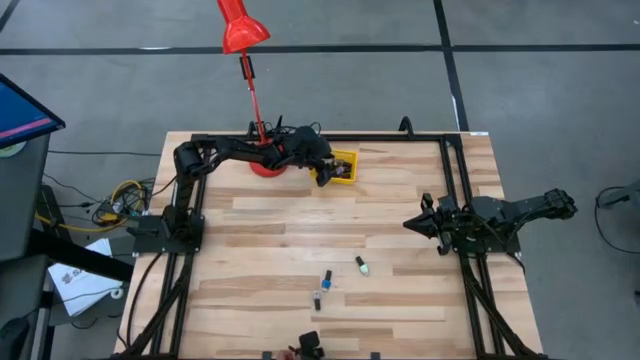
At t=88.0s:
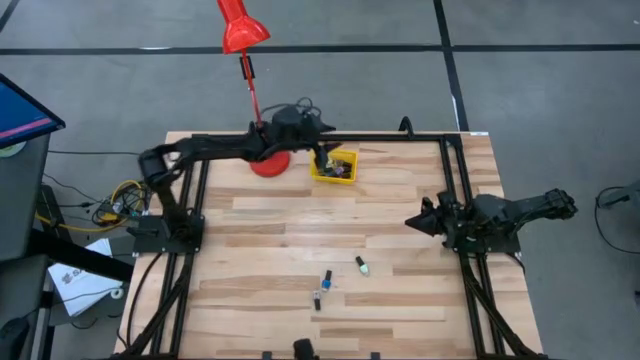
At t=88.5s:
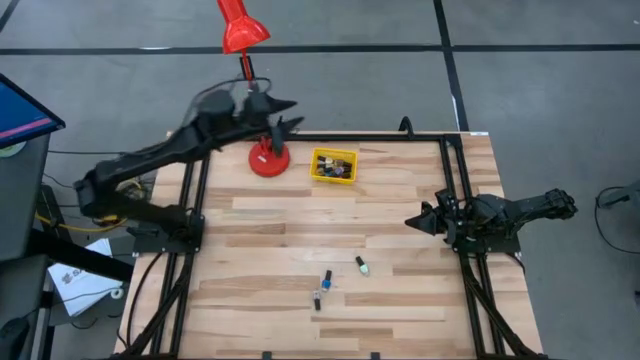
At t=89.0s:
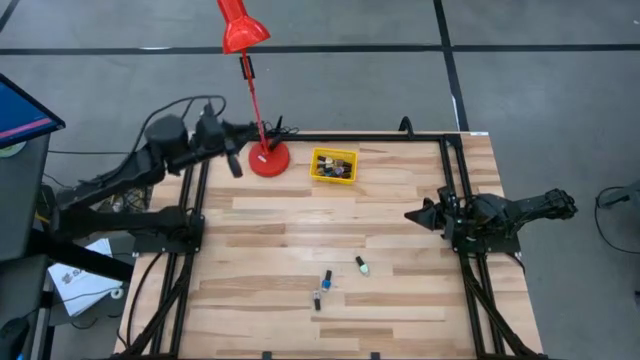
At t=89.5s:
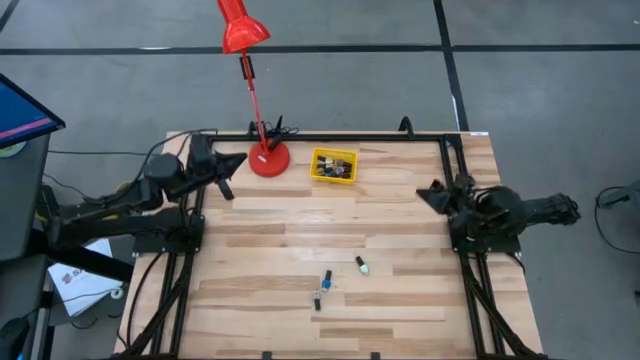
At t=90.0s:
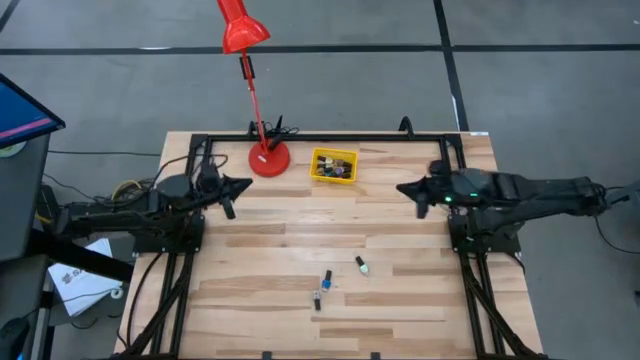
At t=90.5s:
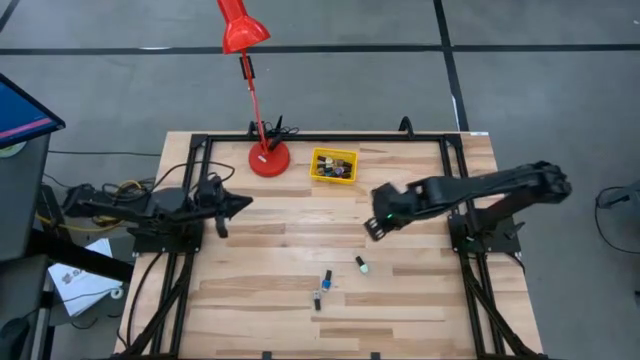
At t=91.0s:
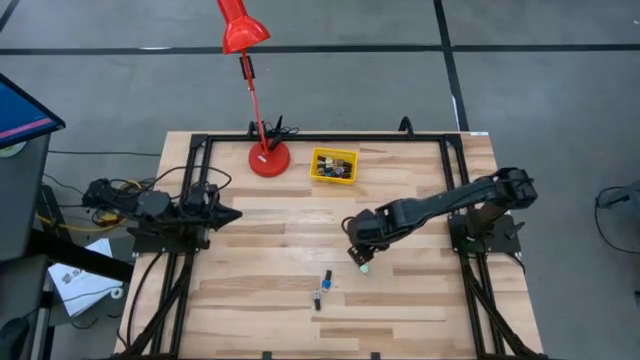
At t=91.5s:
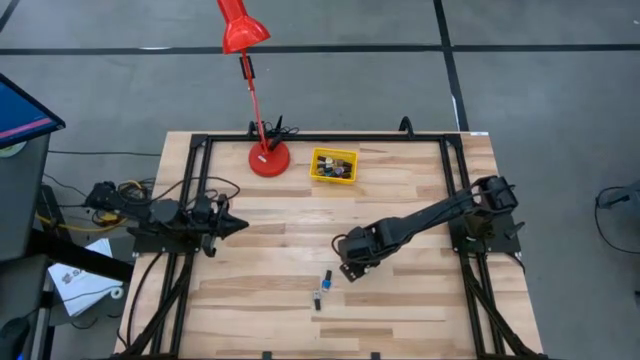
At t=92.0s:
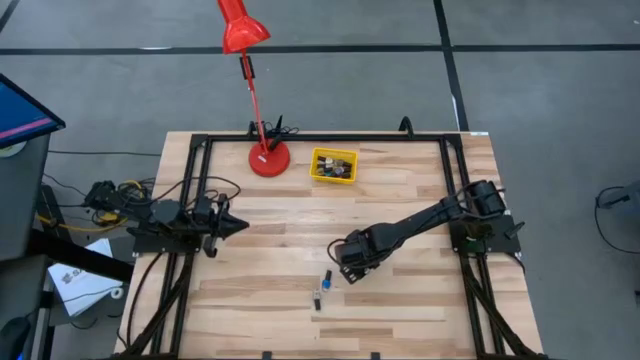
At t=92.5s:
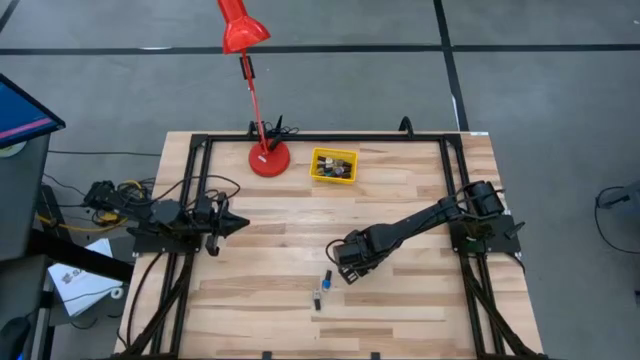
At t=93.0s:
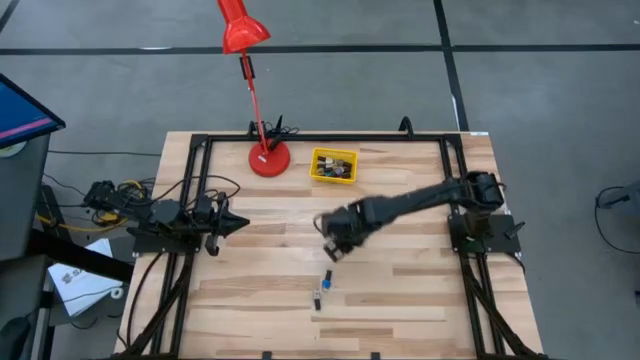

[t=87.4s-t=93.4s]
Task: Pick & Place Nail Polish
Put the light blue nail polish bottle into the yellow bin

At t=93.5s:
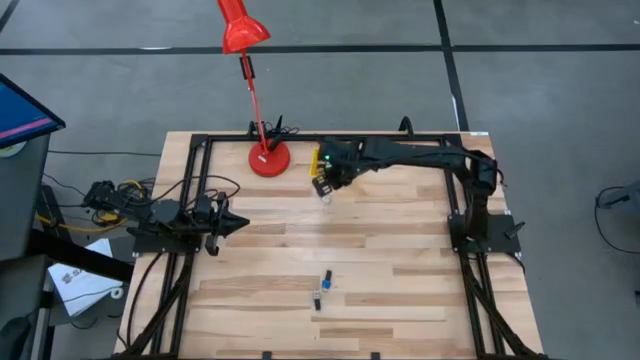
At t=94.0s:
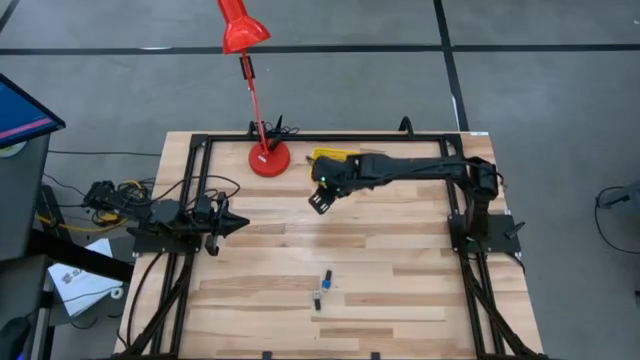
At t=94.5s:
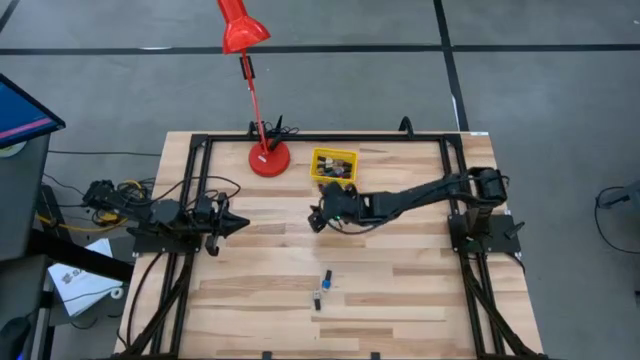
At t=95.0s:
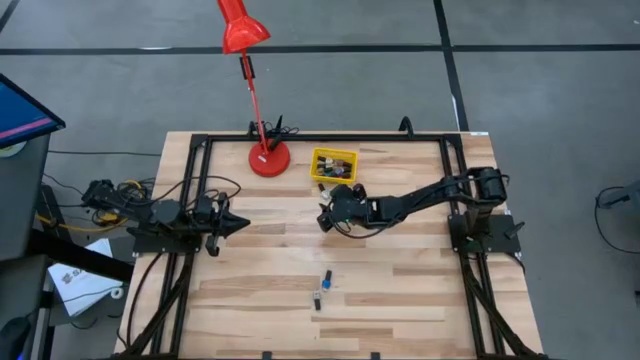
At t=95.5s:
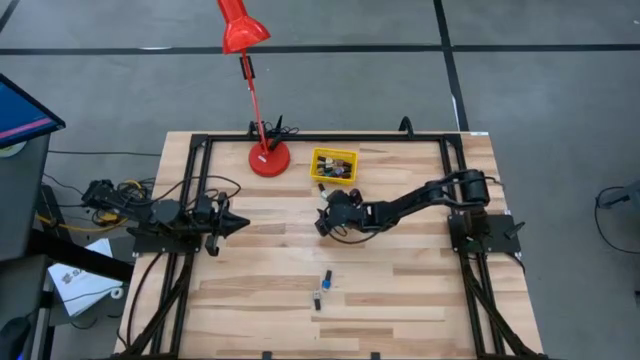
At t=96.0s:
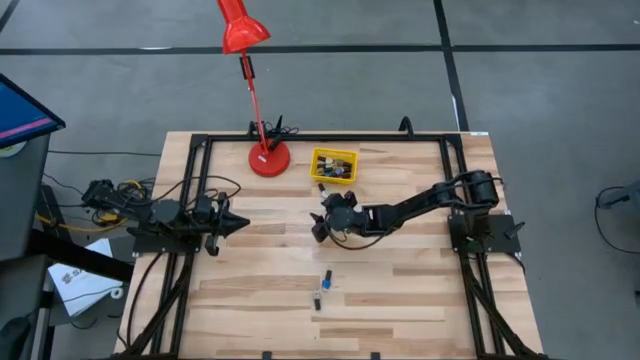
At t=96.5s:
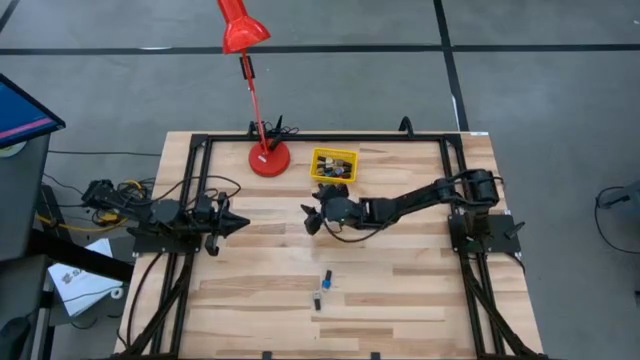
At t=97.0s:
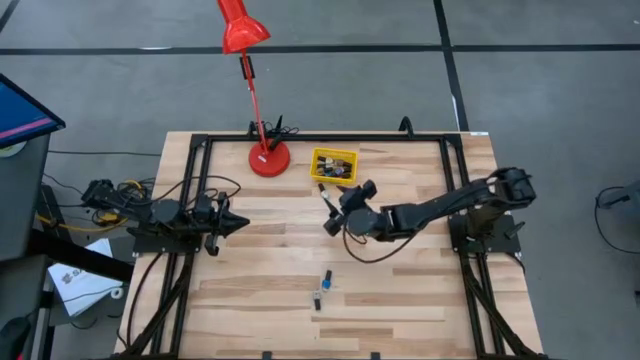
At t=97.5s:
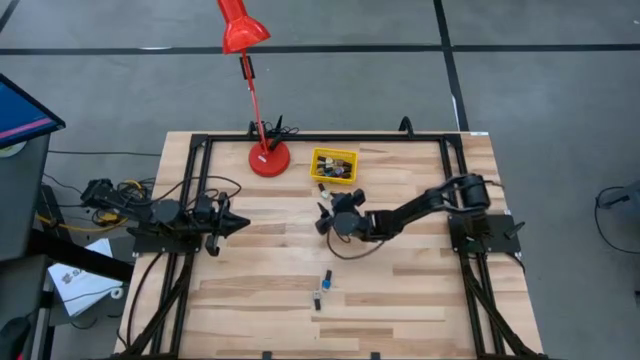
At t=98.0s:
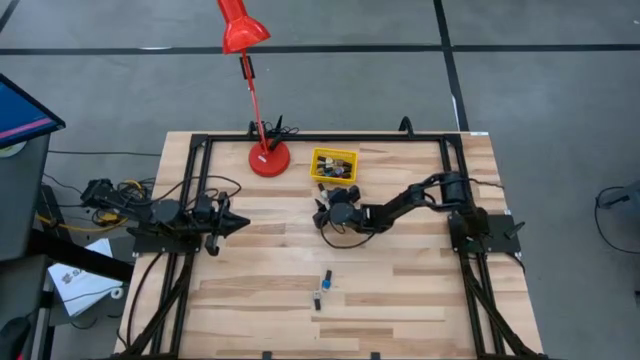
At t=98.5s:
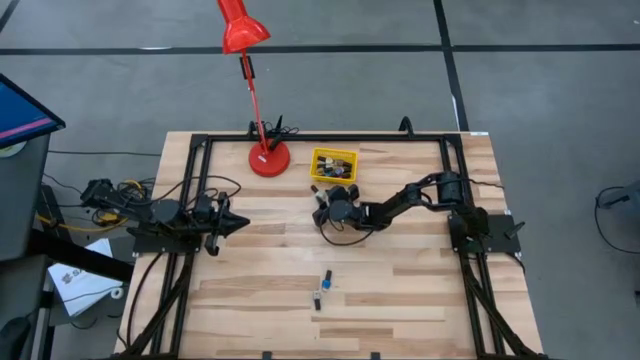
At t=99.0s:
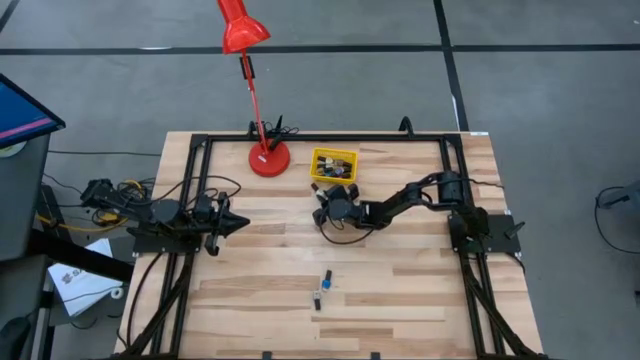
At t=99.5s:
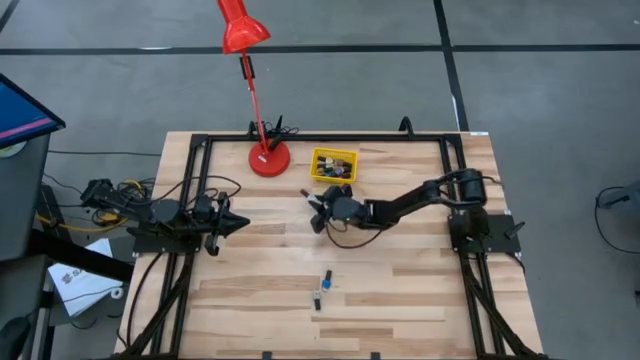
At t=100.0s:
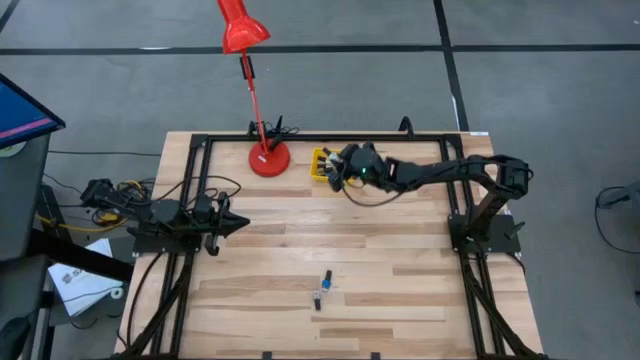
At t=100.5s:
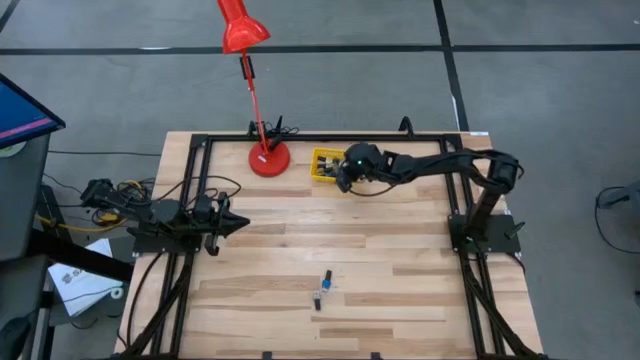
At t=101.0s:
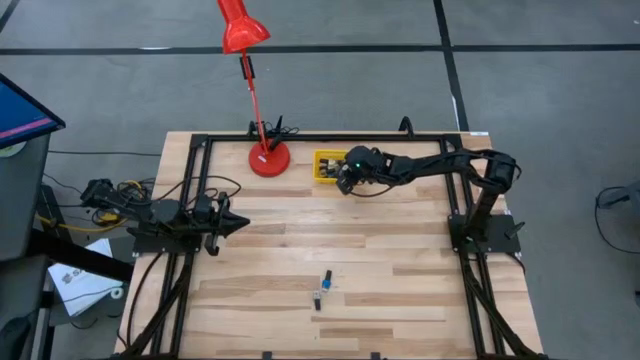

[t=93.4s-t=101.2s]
Put the light blue nail polish bottle into the yellow bin

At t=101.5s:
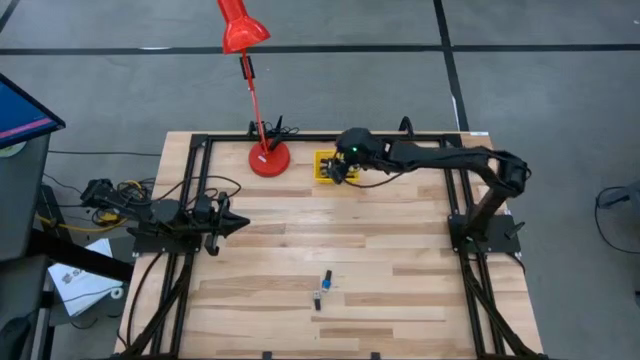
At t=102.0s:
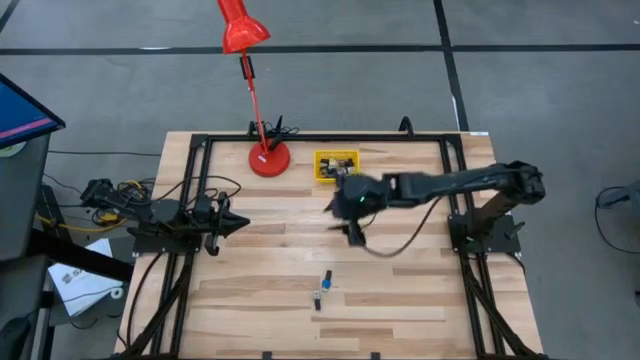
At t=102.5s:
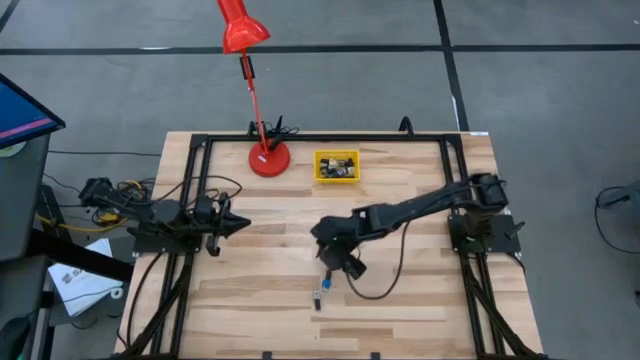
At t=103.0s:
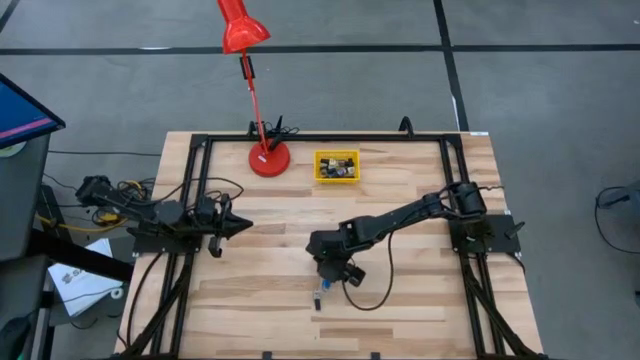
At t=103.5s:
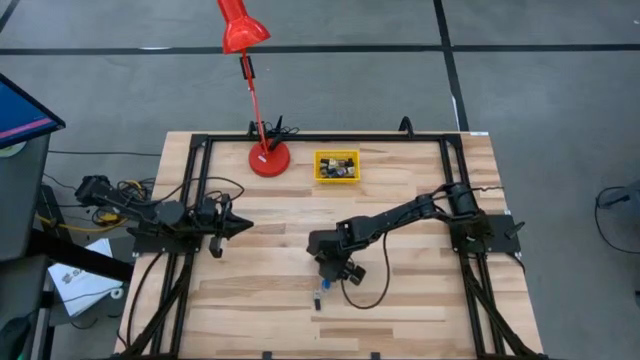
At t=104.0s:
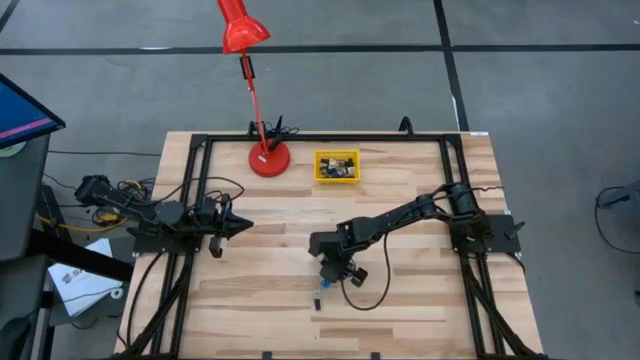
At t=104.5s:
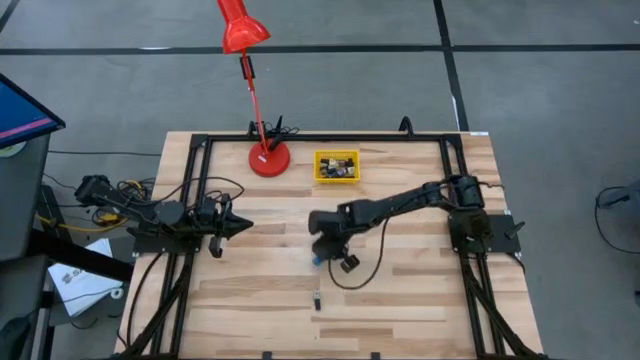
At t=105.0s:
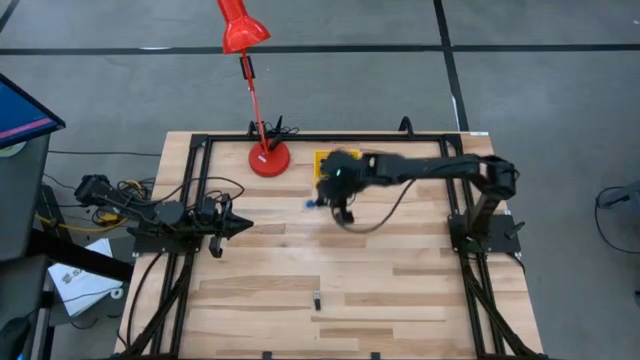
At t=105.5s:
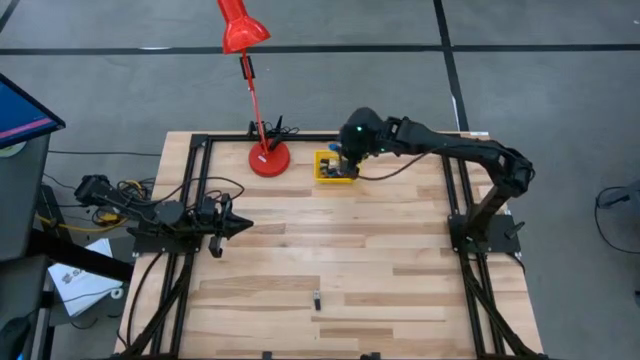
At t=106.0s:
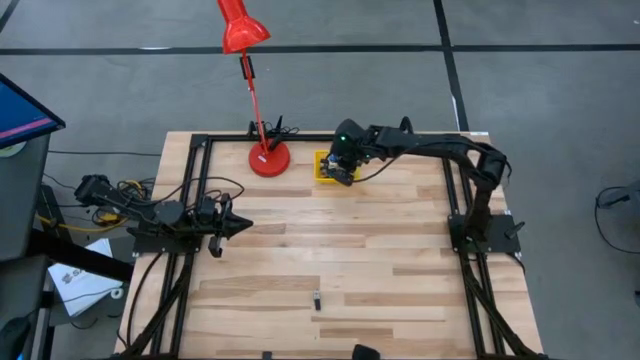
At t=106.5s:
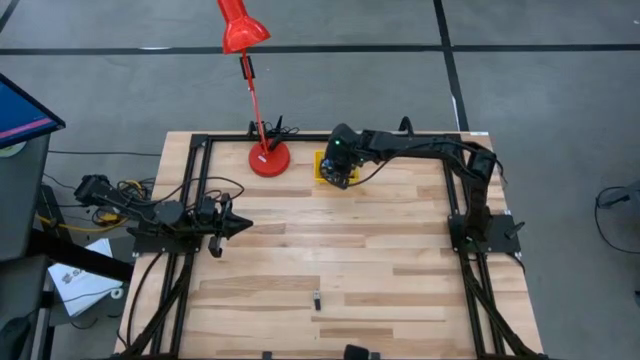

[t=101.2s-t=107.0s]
Put the dark blue nail polish bottle into the yellow bin

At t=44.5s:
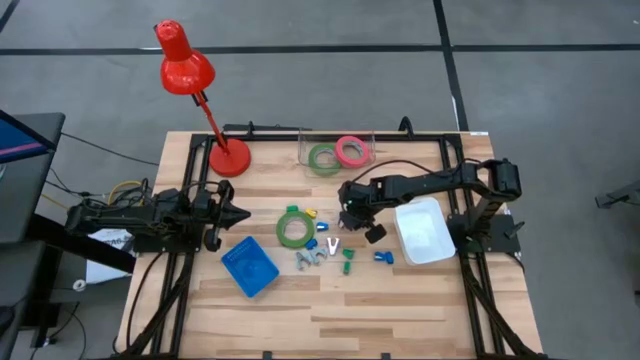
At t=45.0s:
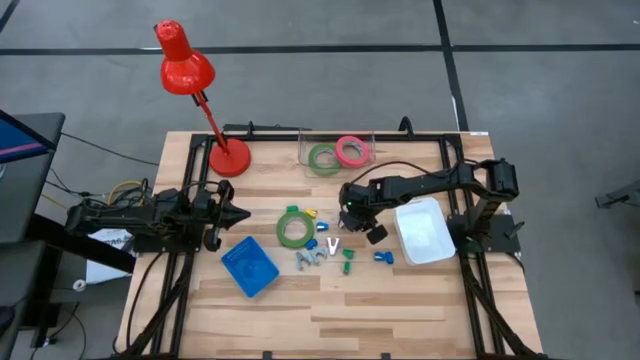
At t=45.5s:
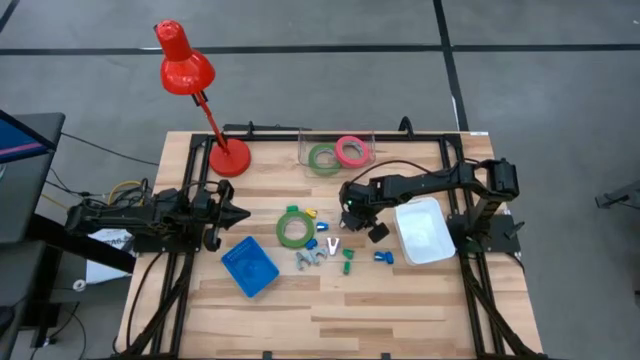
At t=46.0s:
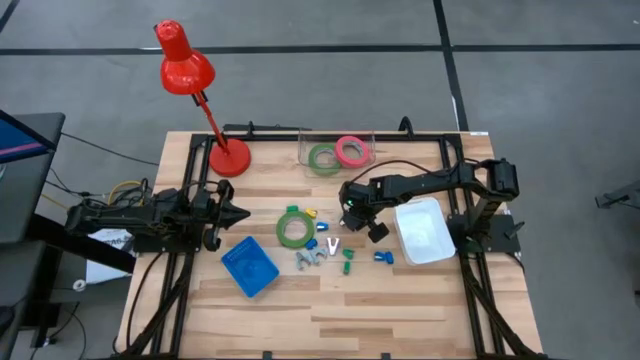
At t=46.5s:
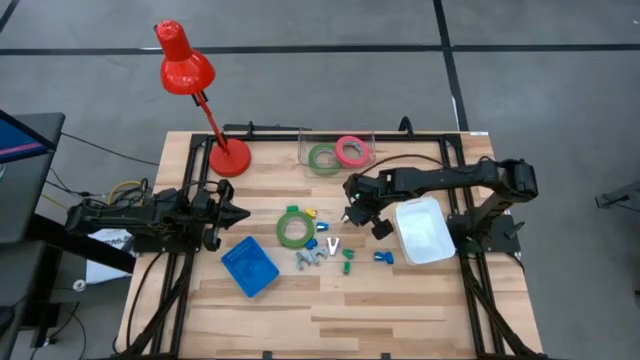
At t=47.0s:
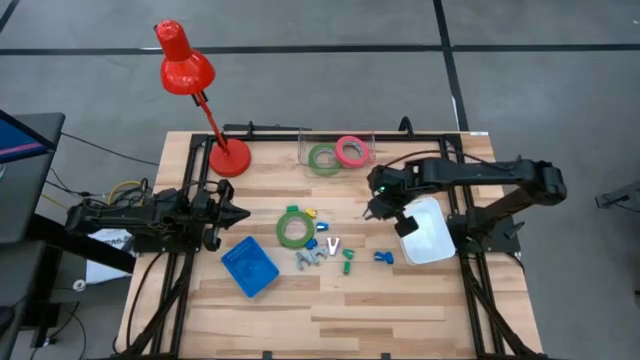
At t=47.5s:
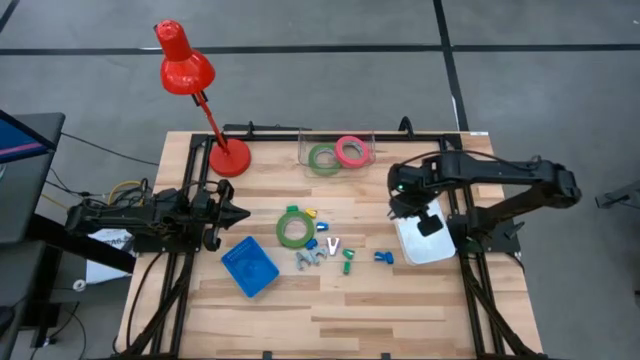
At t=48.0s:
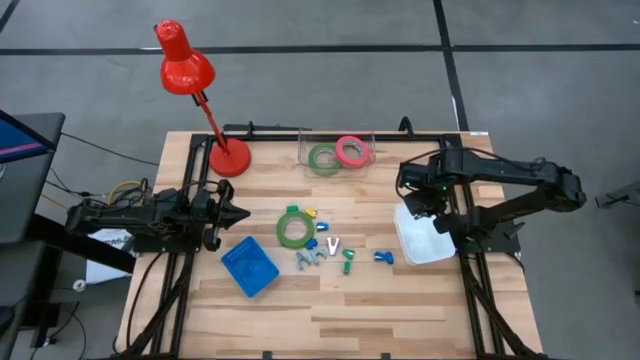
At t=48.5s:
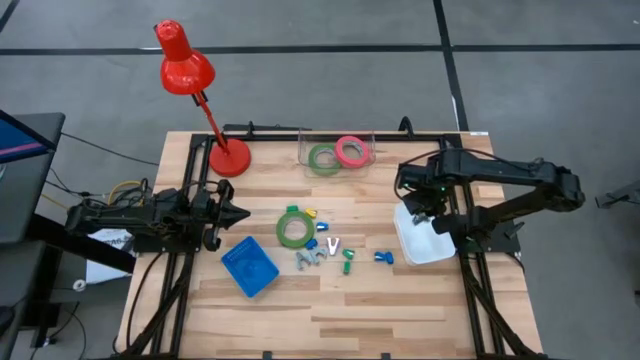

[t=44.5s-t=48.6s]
Task: Pick and place Stapler, Stapler remover, tape
Put the black stapler remover into the white bin
